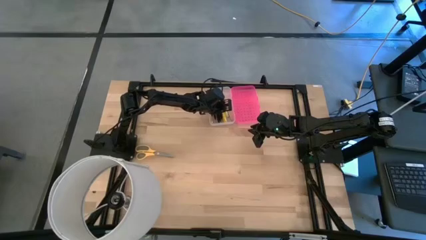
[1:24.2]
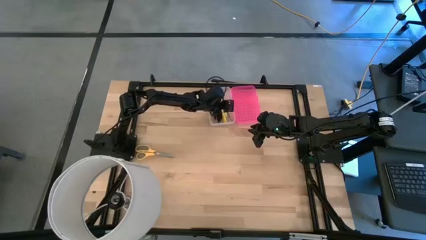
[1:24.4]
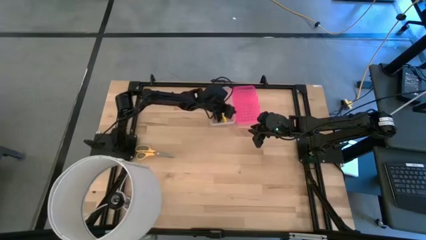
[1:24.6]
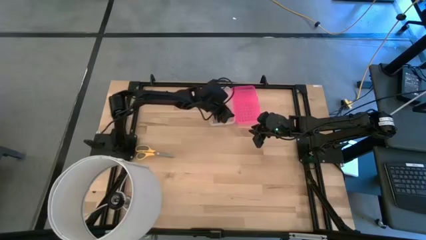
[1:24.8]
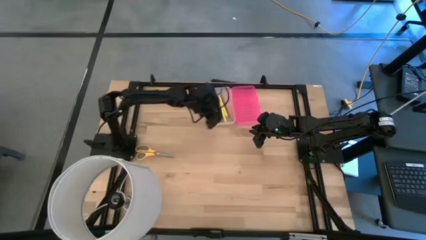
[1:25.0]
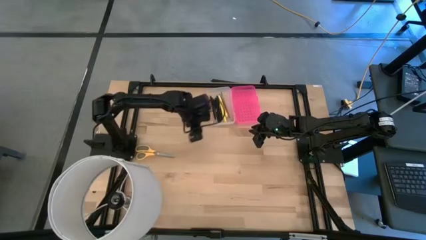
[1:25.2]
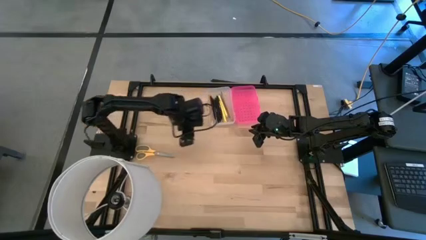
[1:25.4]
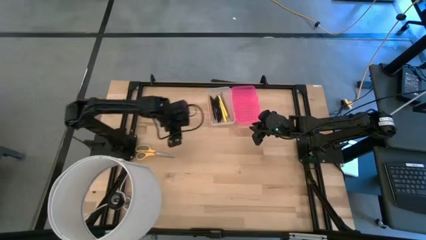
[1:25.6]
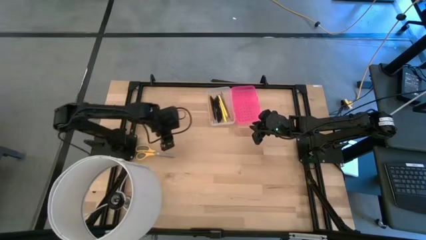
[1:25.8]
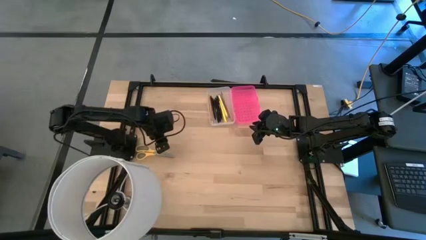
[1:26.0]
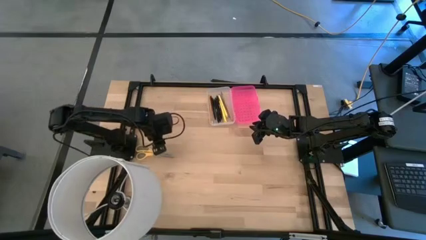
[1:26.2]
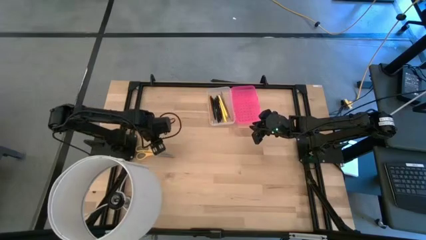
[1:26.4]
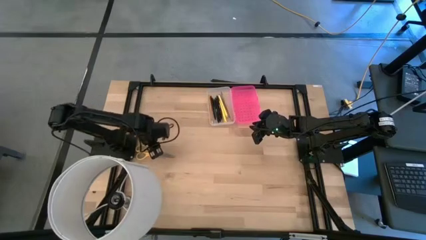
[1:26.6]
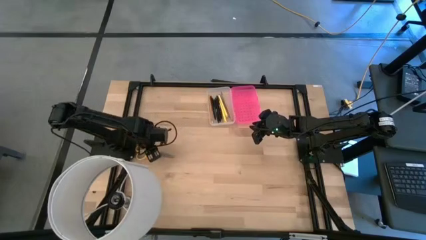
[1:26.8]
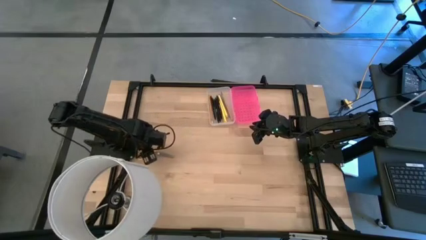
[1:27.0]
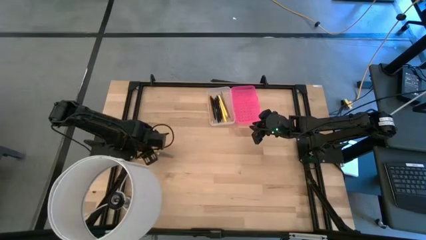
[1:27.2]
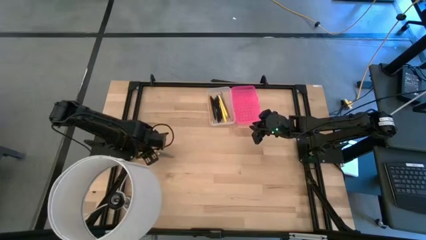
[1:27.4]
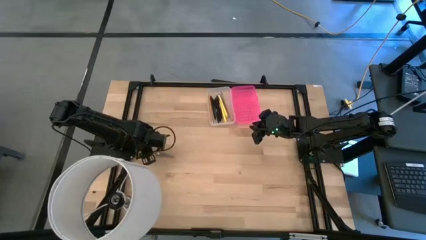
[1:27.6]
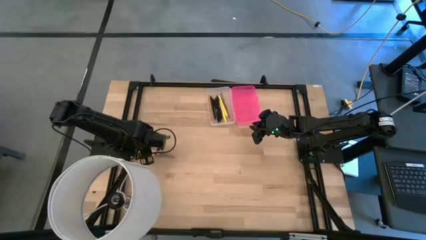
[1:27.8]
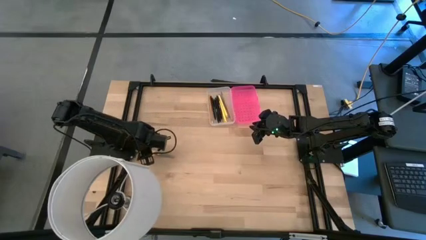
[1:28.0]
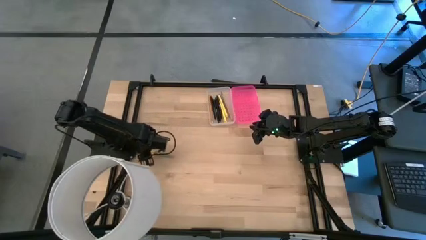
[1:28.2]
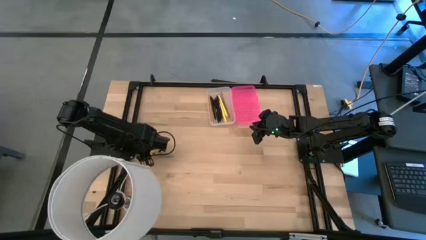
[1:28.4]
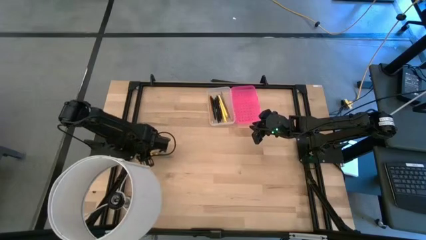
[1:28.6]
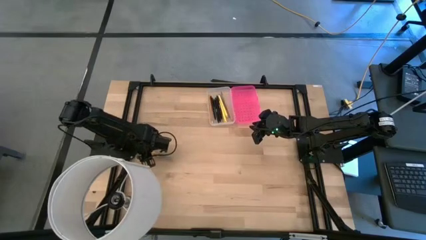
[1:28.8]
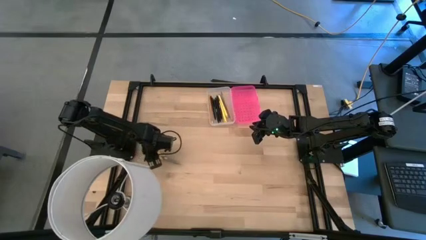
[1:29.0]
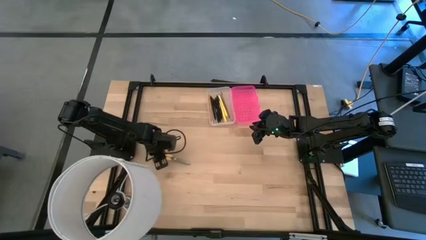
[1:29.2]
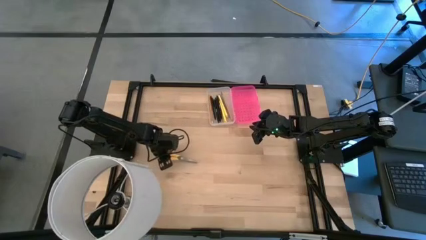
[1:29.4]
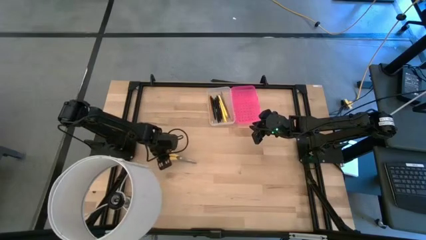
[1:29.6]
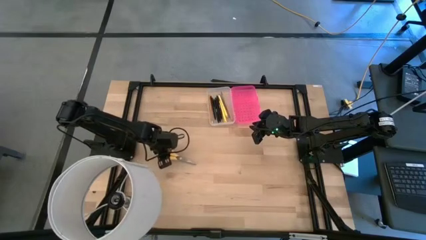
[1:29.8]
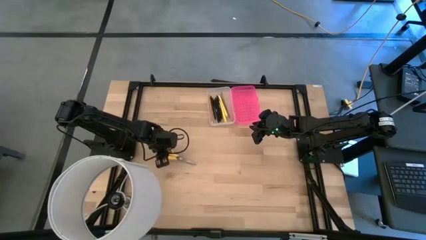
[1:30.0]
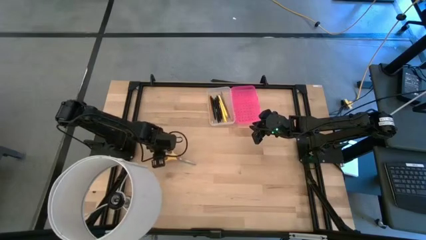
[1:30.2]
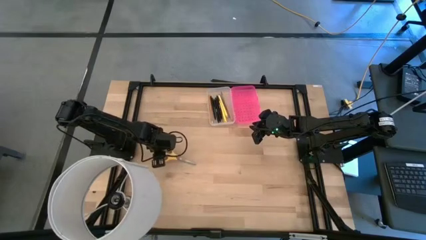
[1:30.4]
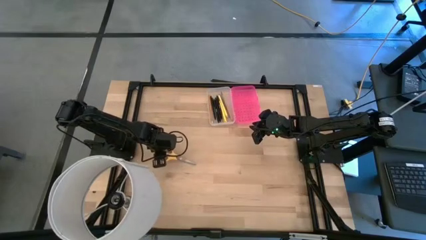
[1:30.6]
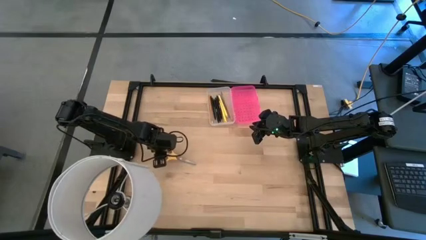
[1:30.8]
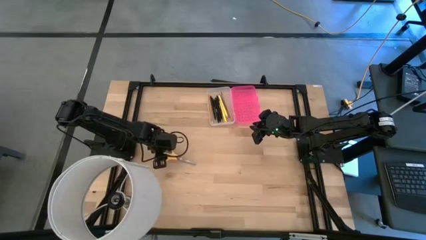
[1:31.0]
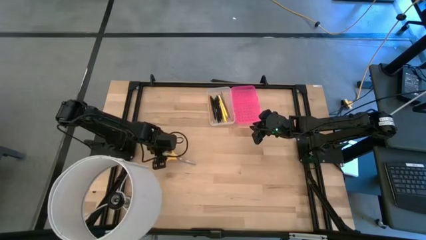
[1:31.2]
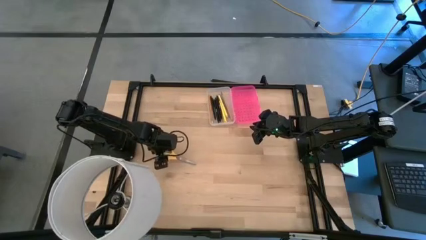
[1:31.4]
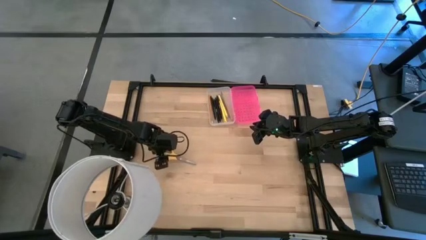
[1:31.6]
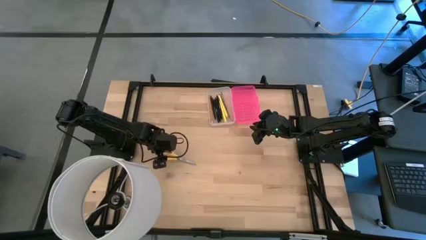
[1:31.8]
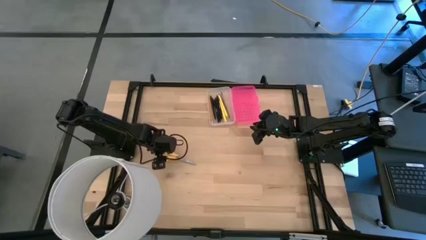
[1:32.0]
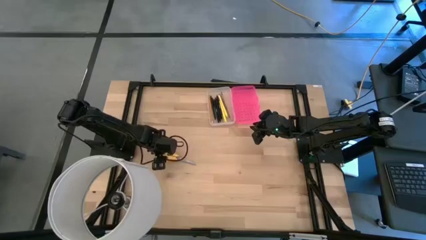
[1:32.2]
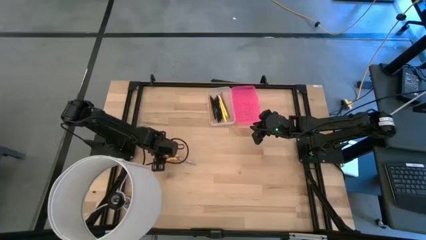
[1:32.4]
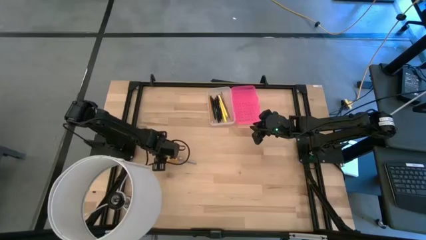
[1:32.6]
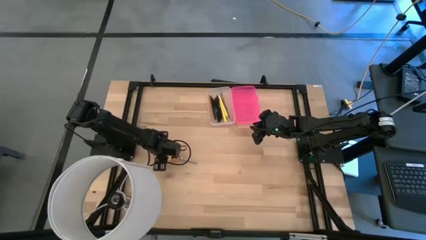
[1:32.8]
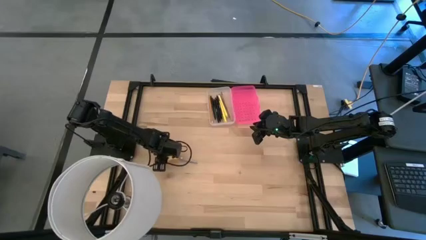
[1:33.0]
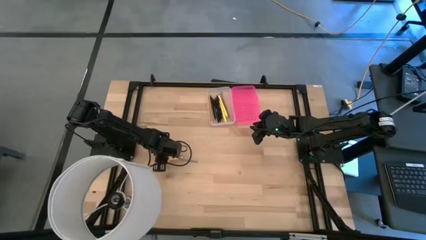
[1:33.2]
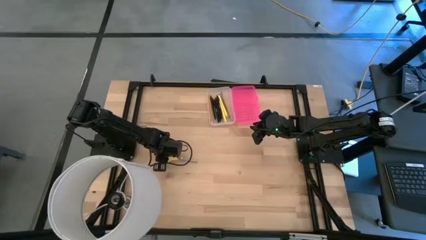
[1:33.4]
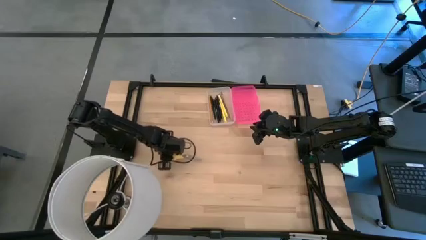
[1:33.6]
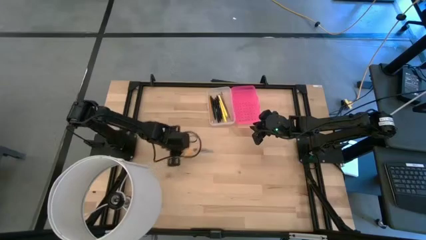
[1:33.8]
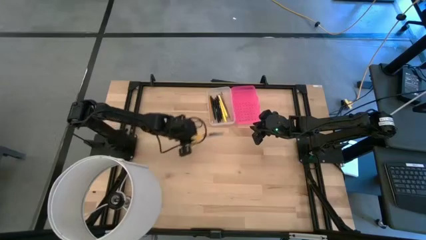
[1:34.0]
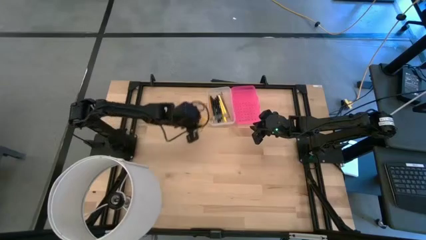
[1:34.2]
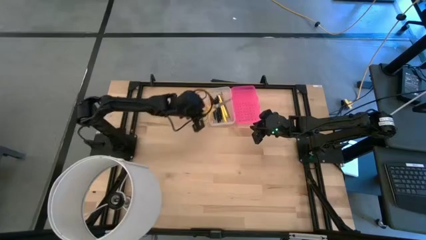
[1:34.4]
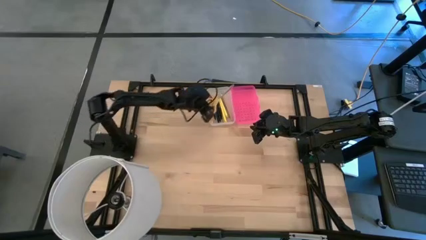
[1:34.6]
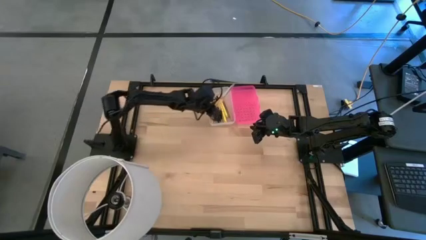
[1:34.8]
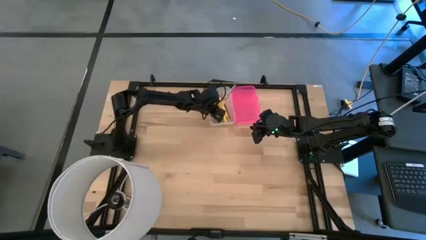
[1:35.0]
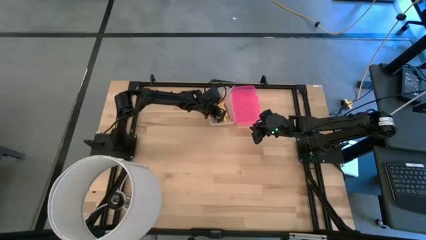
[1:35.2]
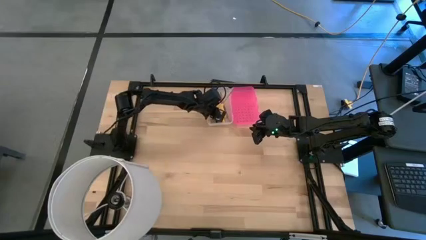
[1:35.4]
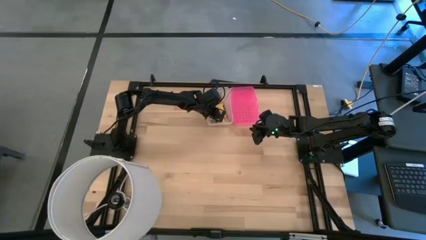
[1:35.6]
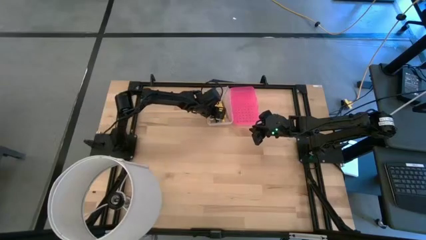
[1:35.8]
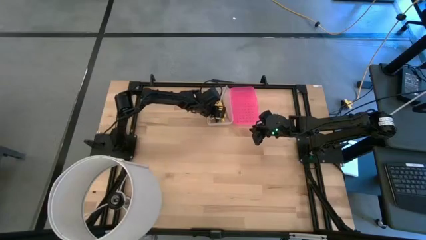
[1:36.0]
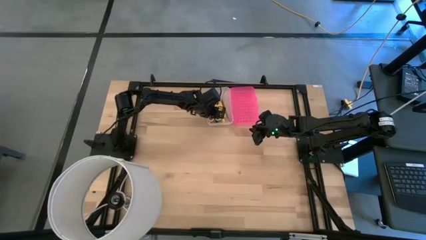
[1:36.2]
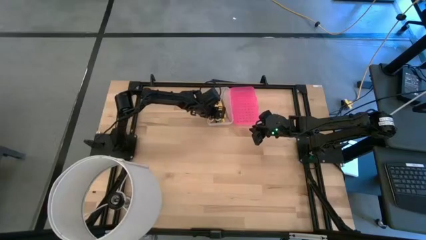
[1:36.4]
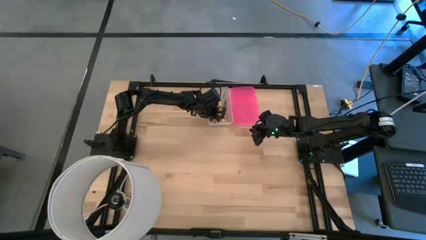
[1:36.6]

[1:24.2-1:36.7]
Task: Pick & place school supplies into a supply box
Put the yellow scissors into the transparent supply box
